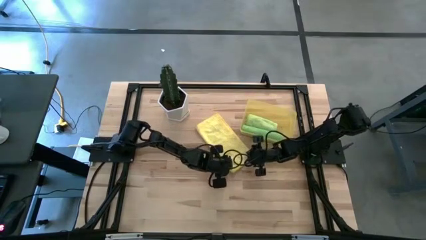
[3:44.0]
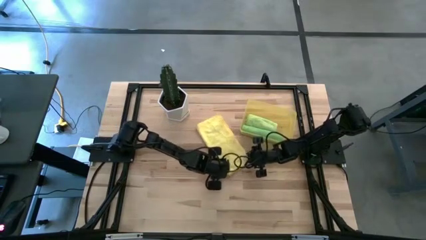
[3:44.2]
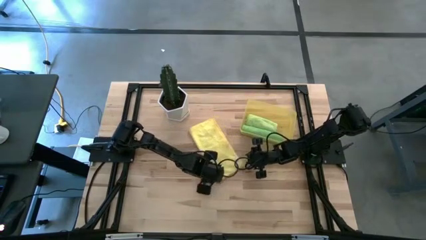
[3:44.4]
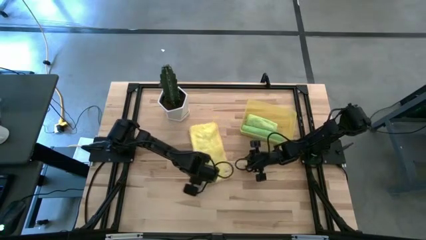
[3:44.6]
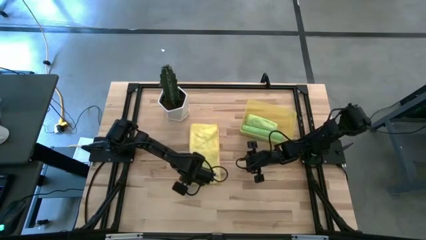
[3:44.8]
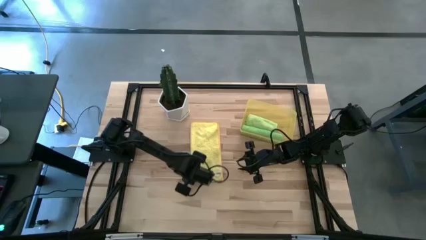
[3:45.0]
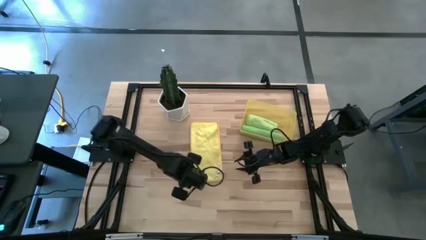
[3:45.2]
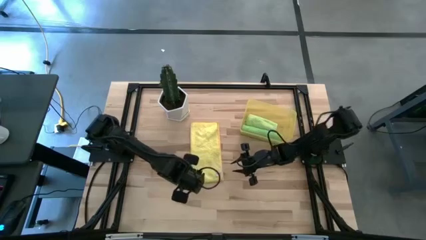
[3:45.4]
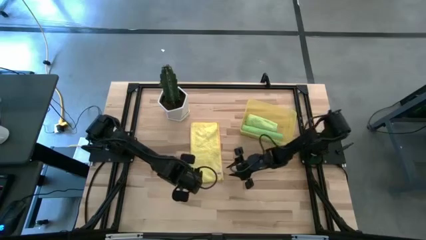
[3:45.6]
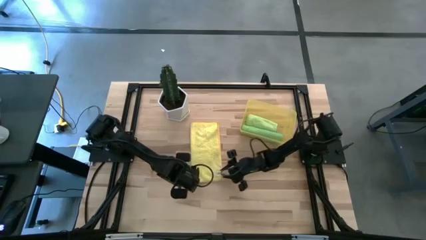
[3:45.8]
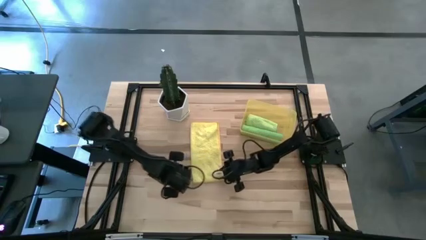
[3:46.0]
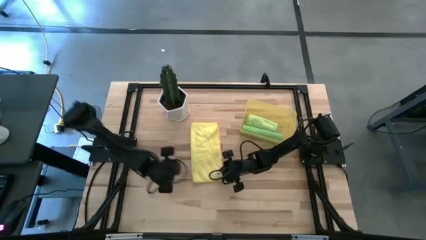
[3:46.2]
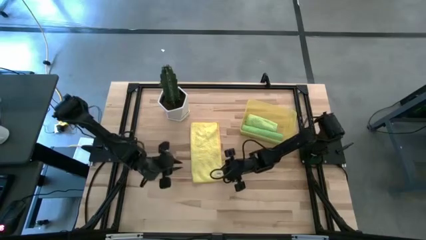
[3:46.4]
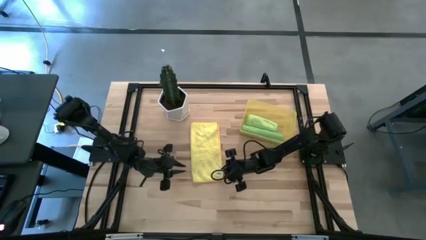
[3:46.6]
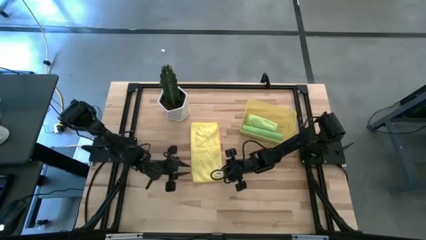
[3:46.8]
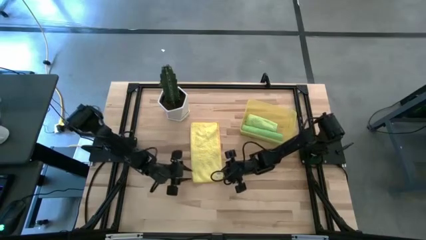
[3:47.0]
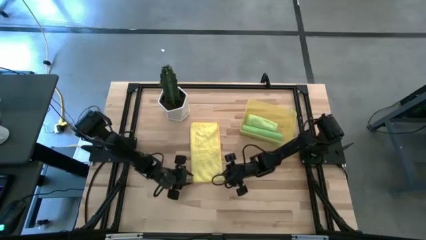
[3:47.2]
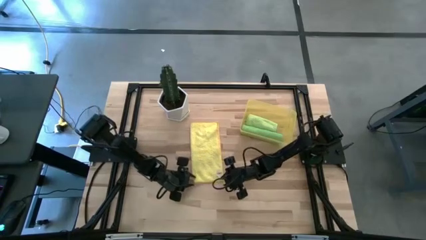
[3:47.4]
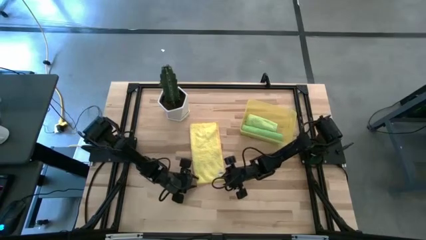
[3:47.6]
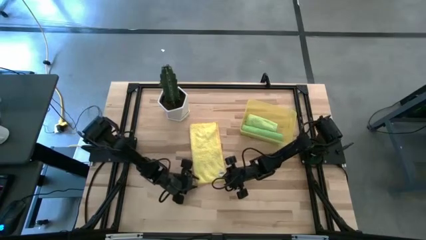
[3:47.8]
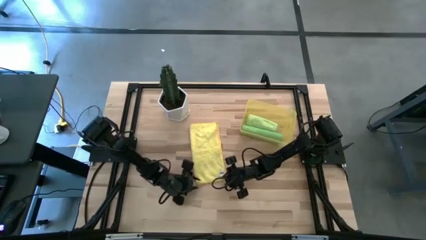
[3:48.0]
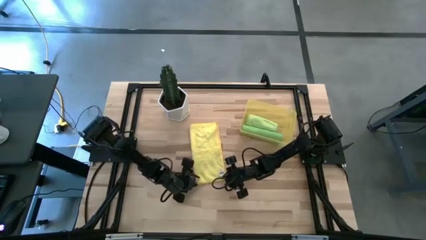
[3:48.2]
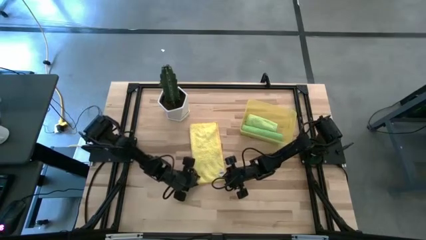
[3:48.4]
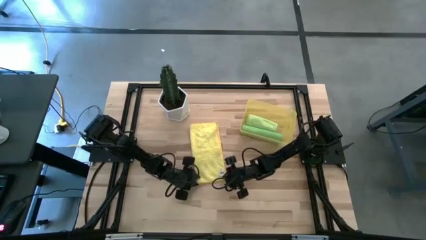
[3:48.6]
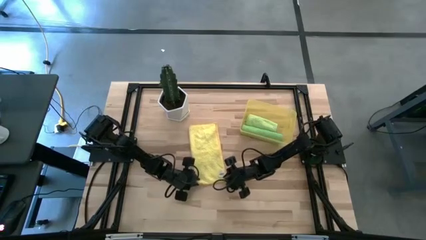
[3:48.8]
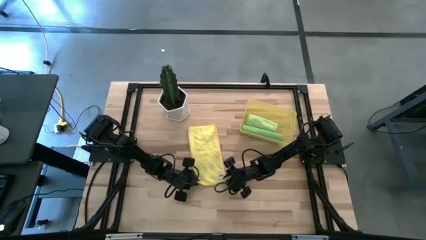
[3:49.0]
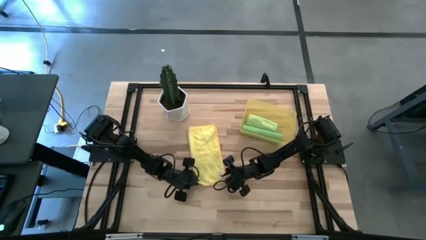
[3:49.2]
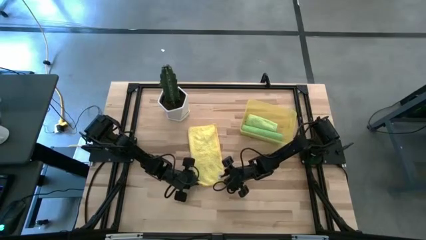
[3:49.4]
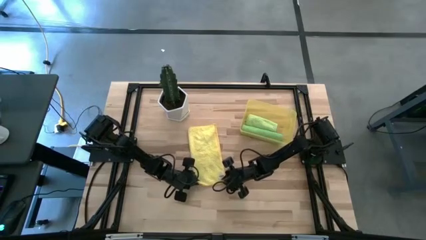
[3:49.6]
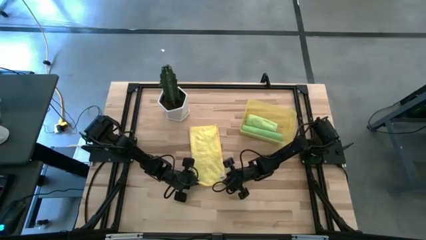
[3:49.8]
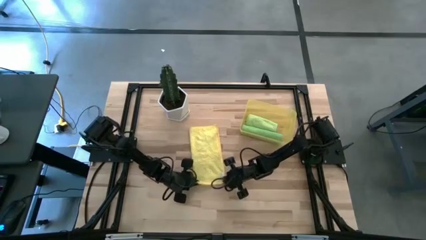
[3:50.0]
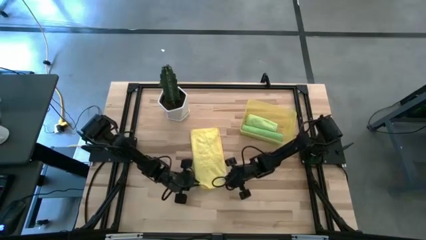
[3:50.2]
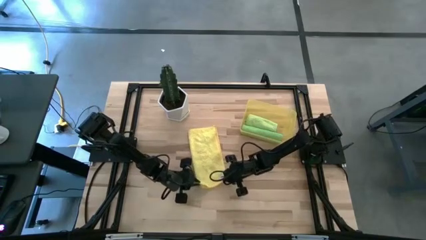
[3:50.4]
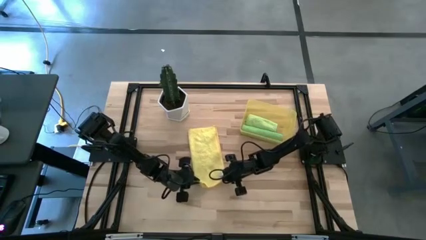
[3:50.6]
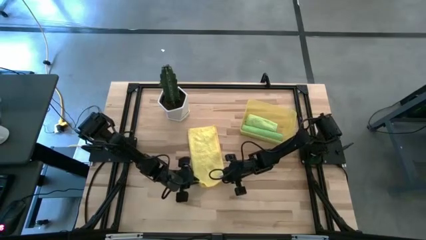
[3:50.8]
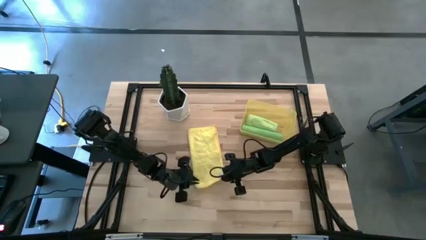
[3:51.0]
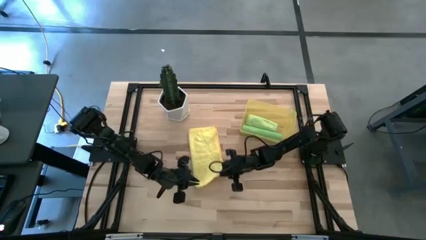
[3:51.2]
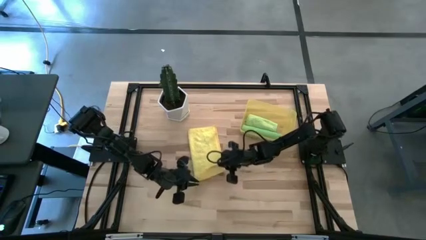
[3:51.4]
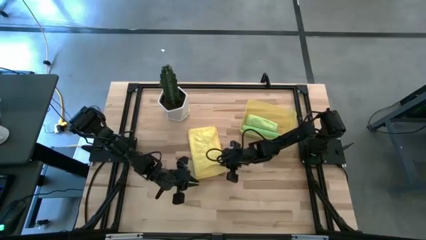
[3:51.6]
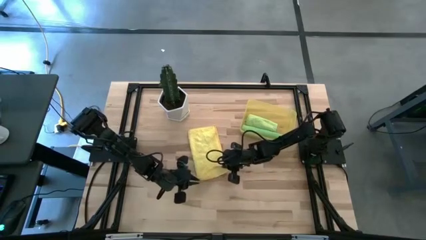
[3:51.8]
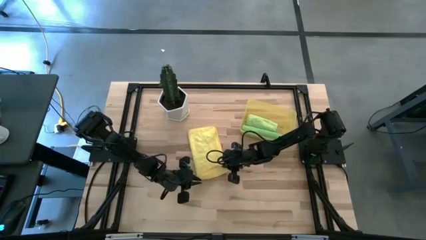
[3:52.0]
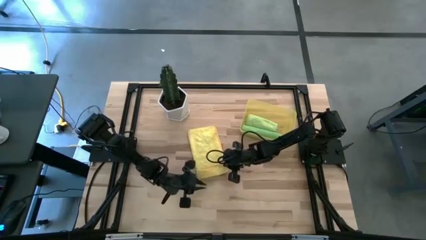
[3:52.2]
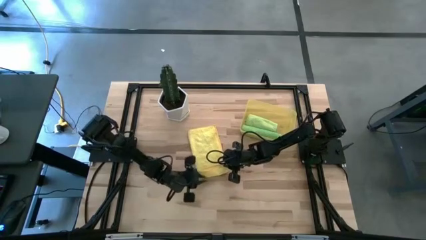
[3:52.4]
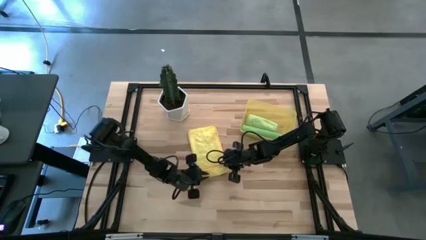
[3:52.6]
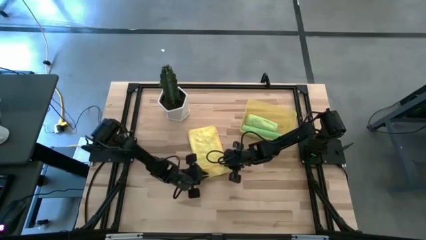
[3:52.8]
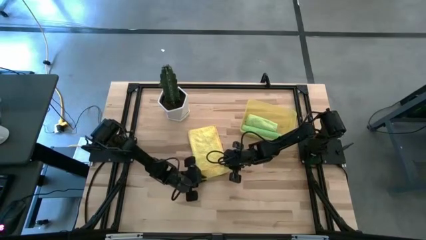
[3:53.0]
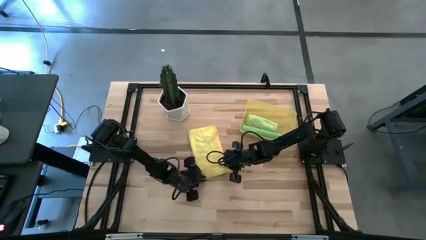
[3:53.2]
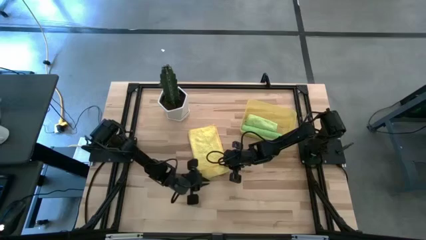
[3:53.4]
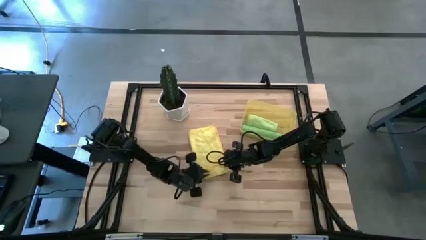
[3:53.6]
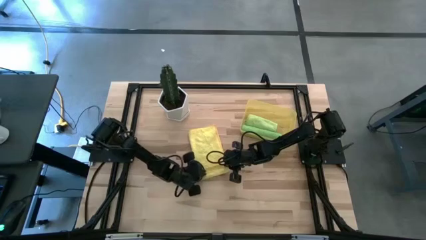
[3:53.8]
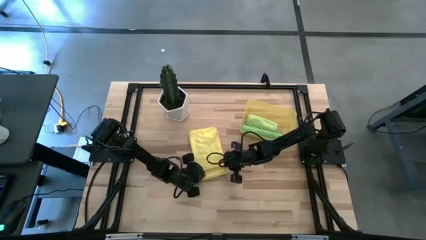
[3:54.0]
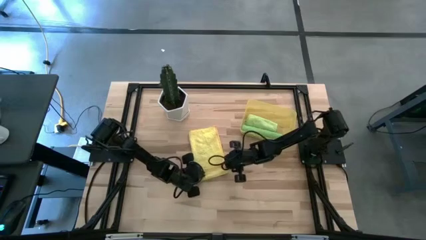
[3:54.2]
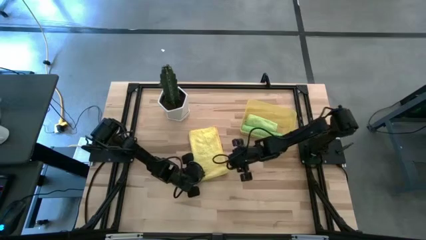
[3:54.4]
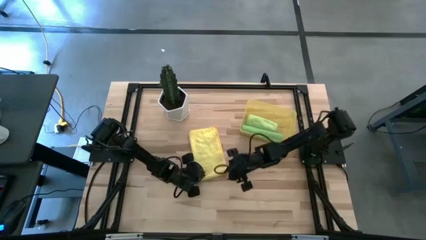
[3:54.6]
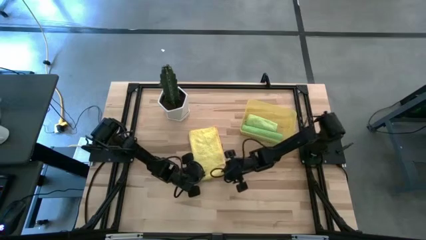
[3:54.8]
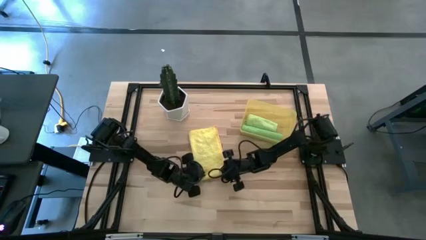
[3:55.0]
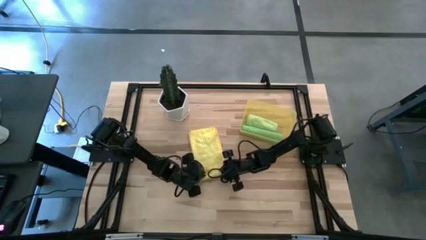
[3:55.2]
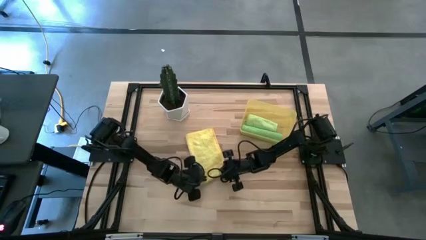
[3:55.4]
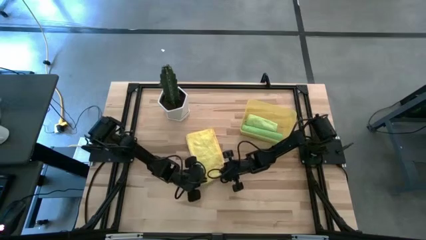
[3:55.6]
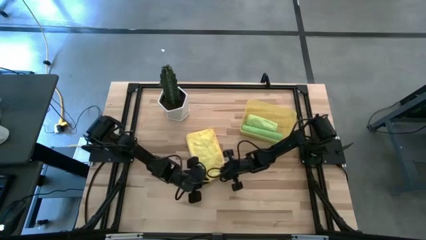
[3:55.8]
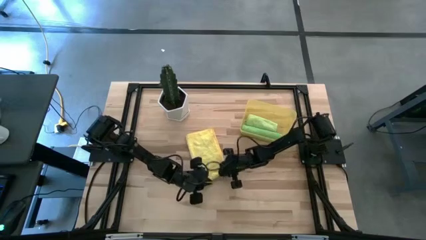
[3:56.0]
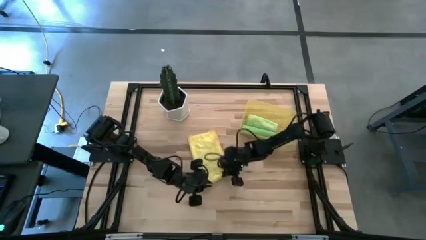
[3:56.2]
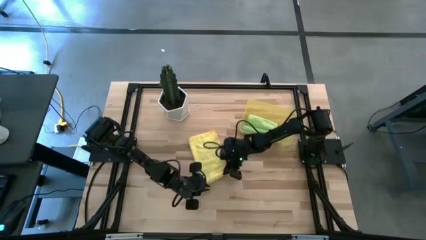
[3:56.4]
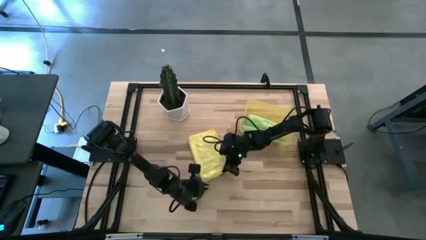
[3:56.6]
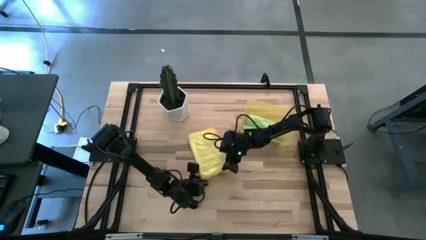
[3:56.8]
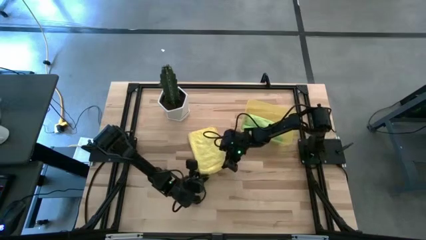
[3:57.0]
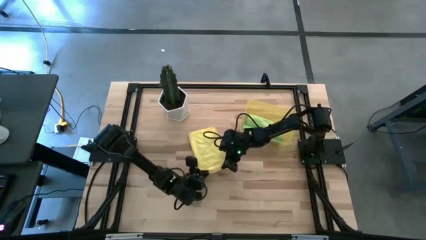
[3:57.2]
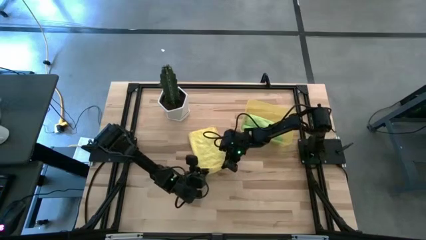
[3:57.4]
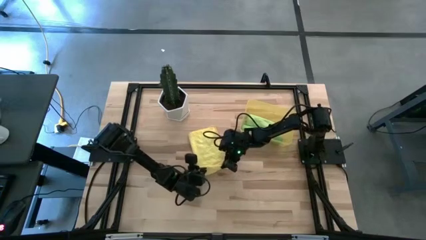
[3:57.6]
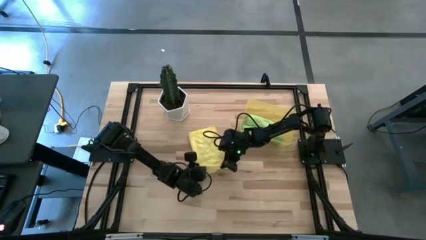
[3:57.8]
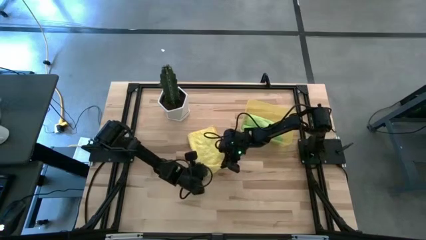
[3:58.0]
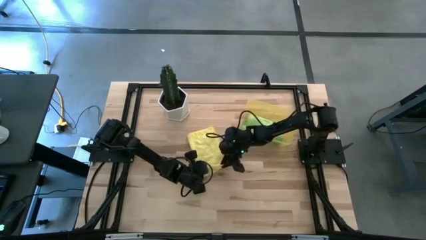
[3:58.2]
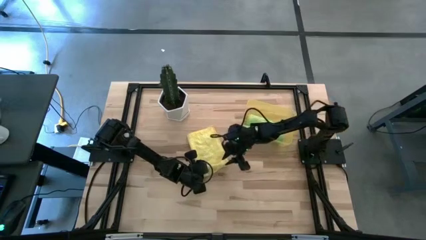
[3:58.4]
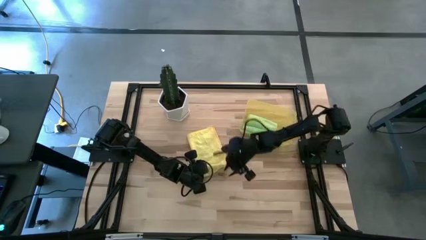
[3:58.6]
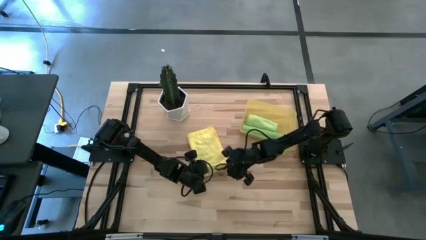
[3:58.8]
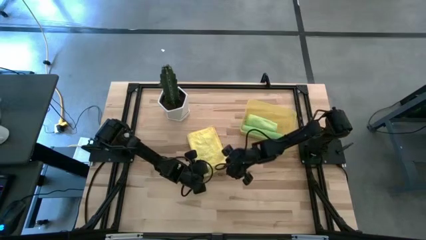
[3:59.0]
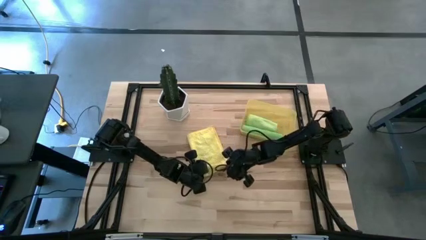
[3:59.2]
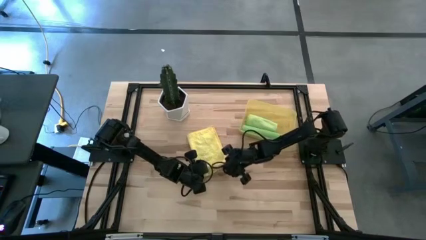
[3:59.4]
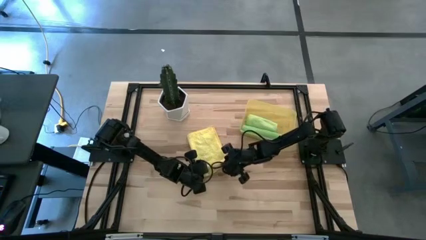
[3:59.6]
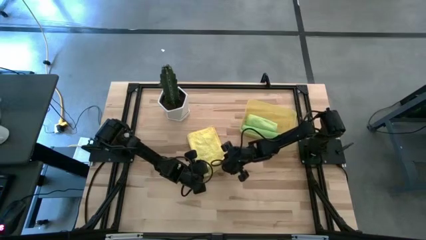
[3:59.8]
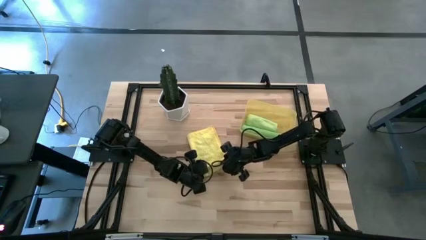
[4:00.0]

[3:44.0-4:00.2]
Task: Roll microfiber towels into tight, uniform cylinder then place into a basket
Roll the yellow microfiber cloth
